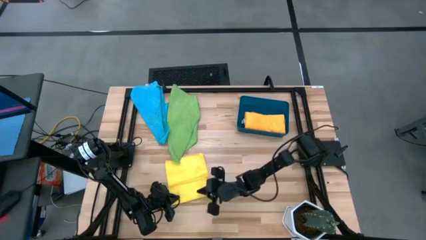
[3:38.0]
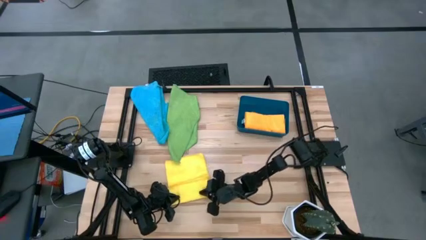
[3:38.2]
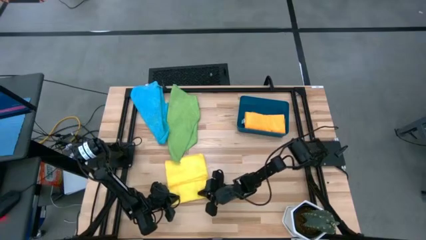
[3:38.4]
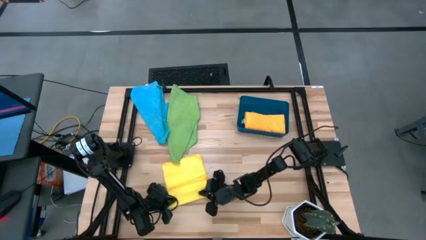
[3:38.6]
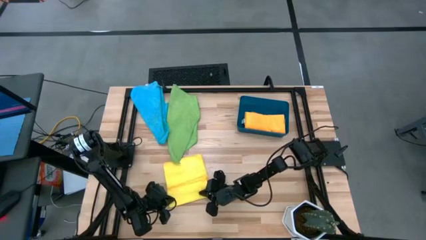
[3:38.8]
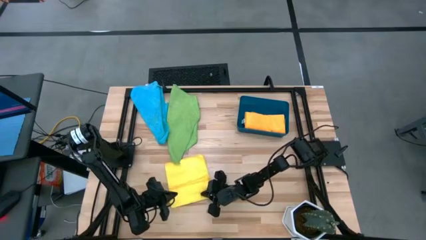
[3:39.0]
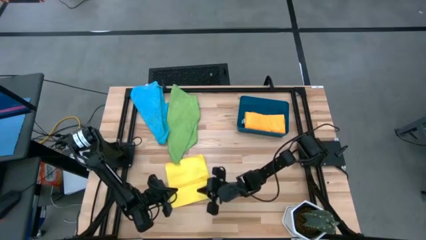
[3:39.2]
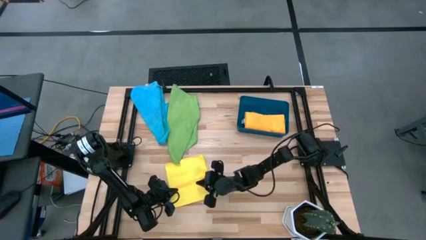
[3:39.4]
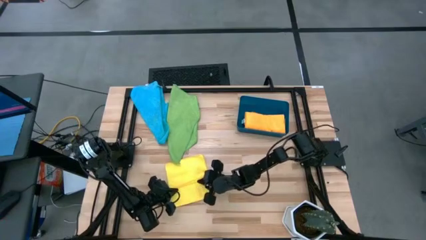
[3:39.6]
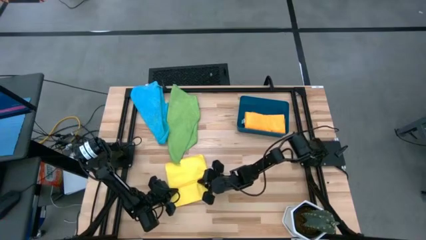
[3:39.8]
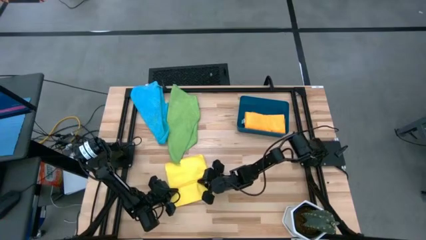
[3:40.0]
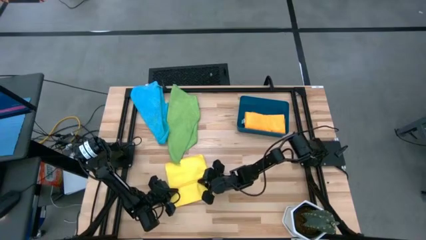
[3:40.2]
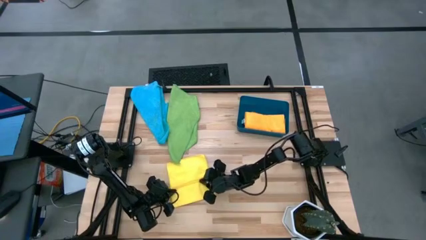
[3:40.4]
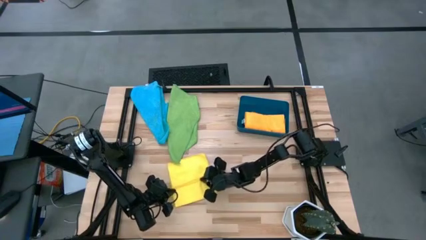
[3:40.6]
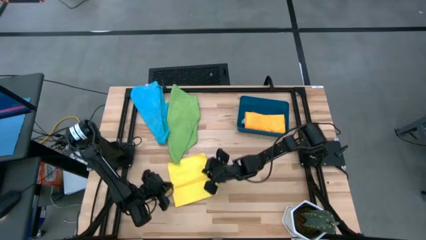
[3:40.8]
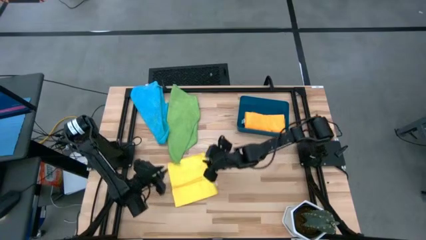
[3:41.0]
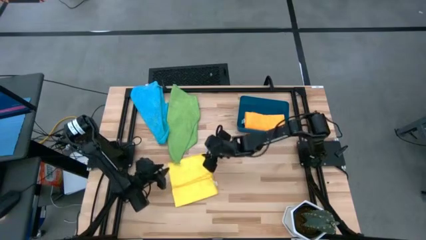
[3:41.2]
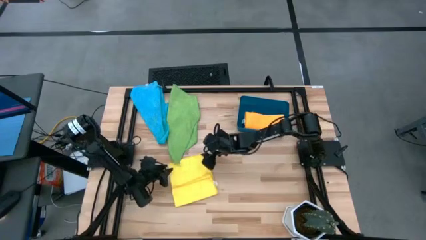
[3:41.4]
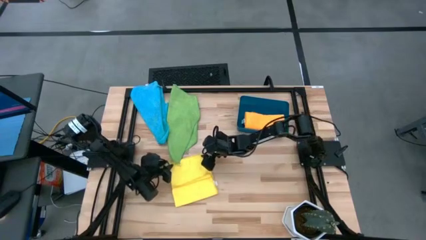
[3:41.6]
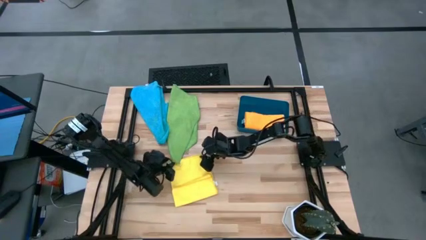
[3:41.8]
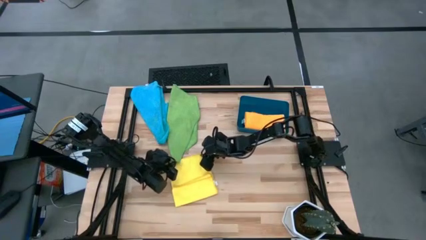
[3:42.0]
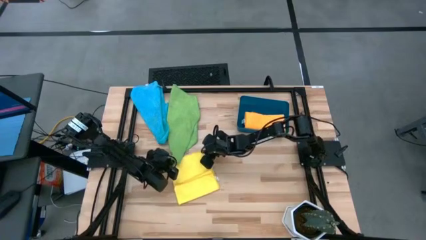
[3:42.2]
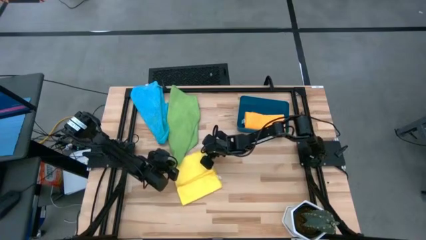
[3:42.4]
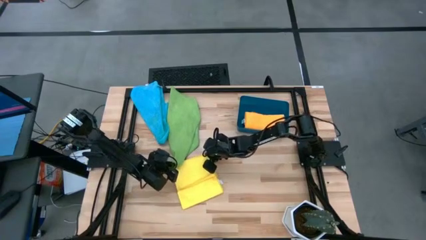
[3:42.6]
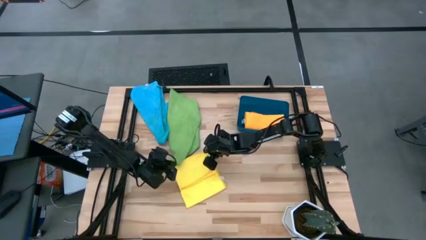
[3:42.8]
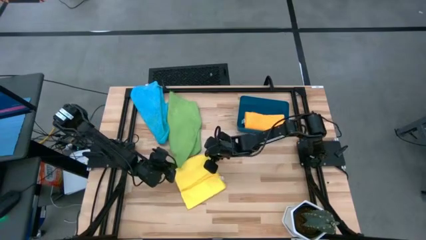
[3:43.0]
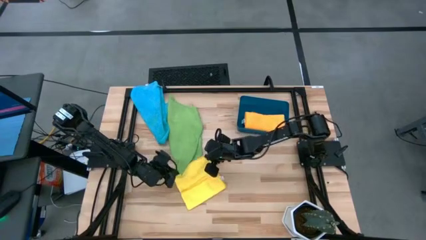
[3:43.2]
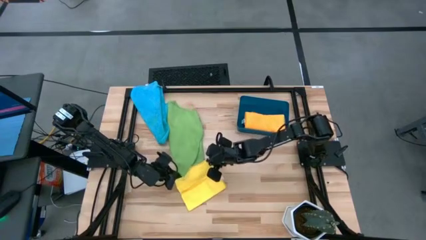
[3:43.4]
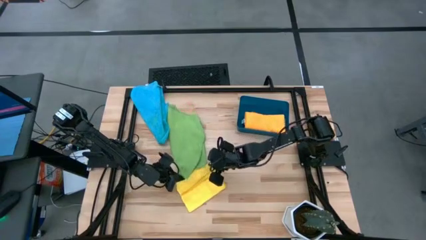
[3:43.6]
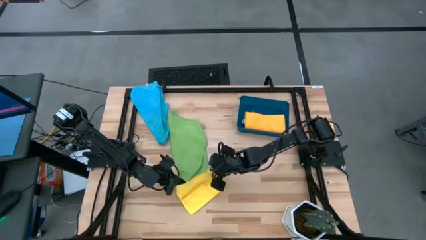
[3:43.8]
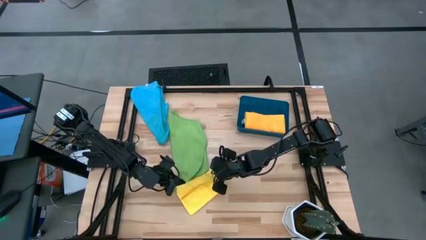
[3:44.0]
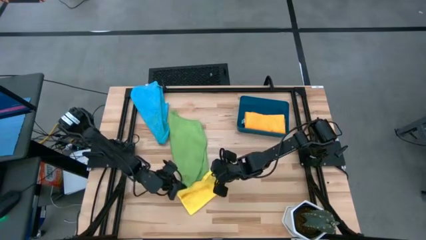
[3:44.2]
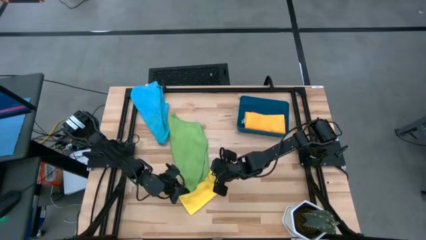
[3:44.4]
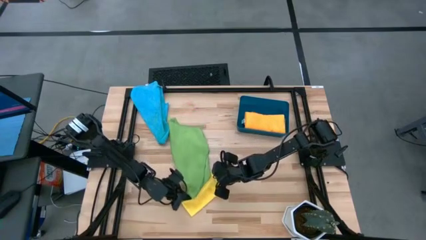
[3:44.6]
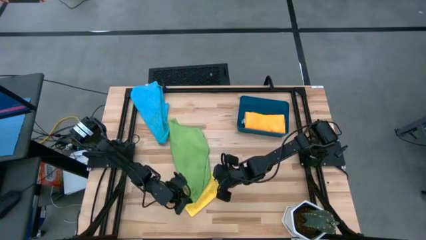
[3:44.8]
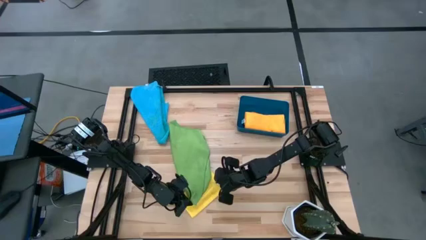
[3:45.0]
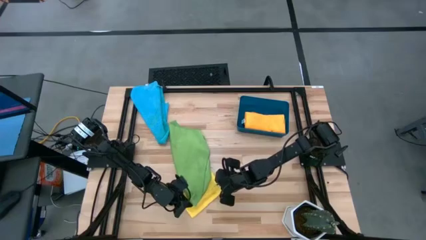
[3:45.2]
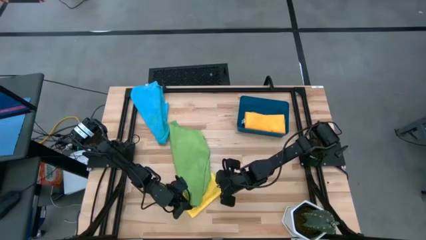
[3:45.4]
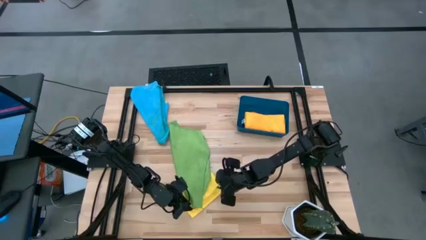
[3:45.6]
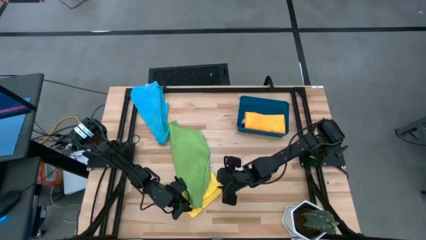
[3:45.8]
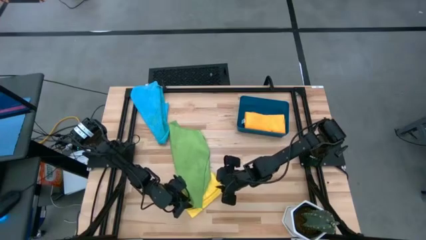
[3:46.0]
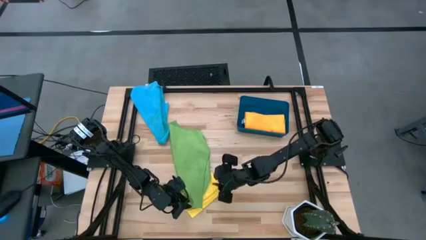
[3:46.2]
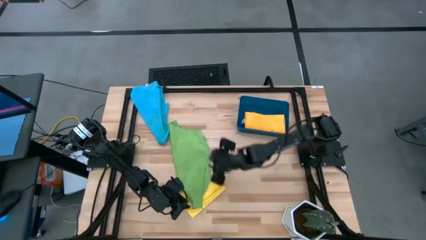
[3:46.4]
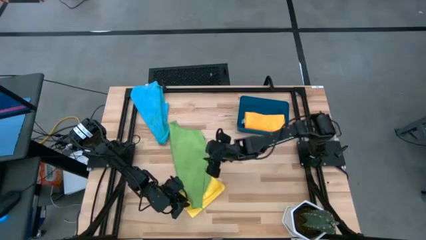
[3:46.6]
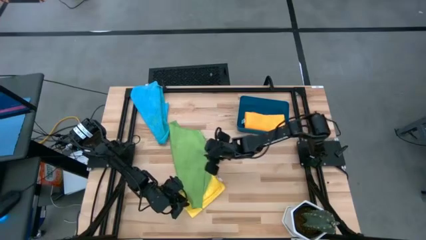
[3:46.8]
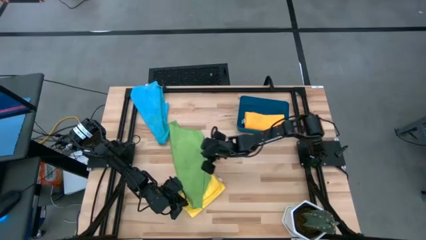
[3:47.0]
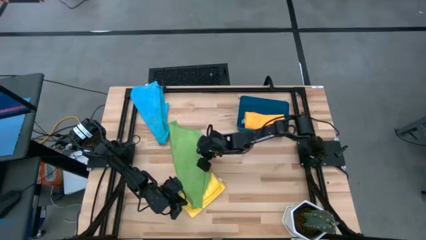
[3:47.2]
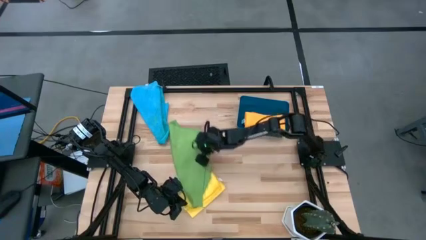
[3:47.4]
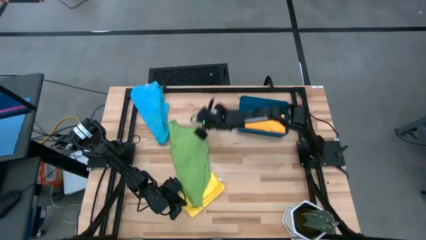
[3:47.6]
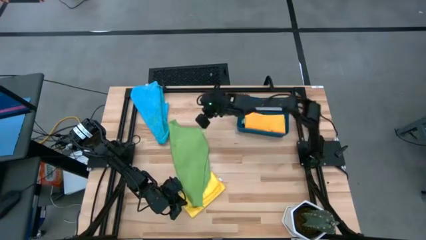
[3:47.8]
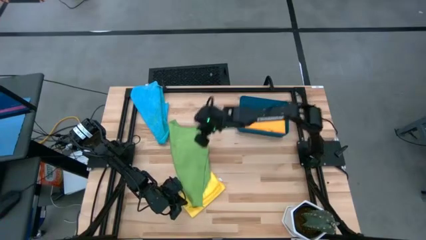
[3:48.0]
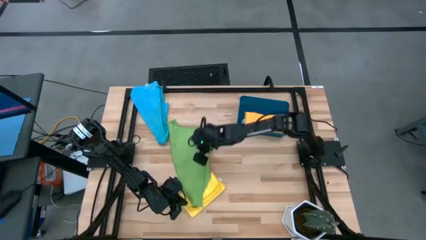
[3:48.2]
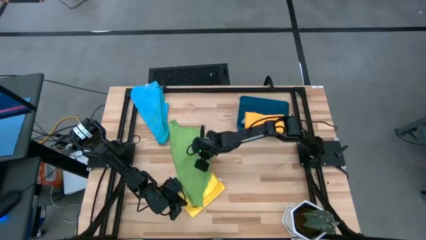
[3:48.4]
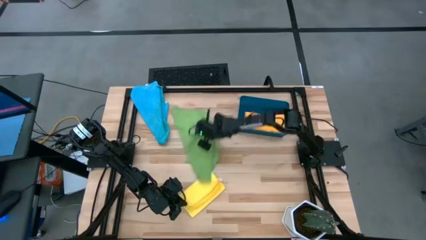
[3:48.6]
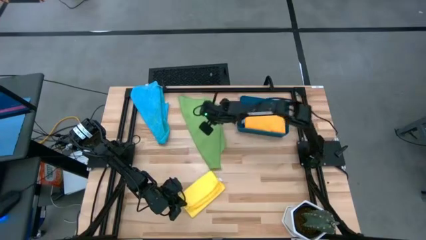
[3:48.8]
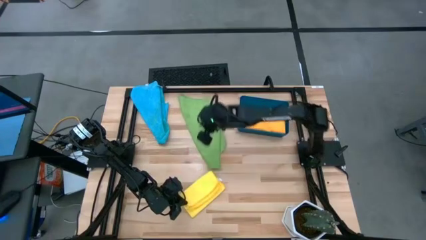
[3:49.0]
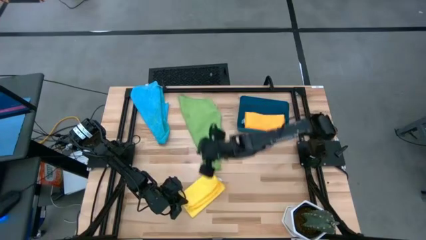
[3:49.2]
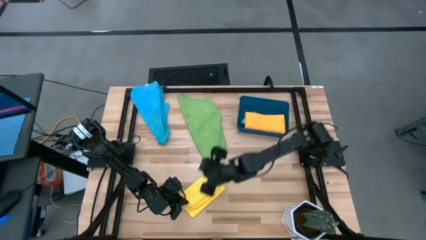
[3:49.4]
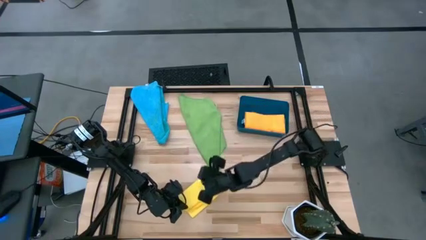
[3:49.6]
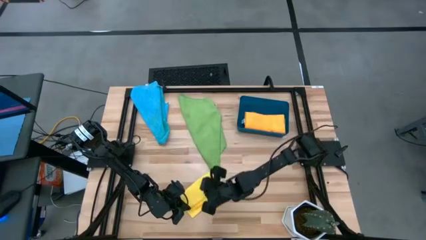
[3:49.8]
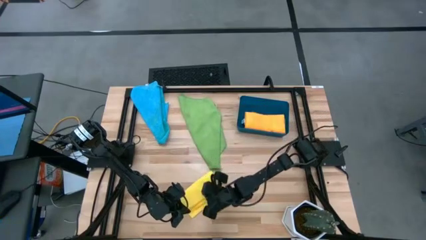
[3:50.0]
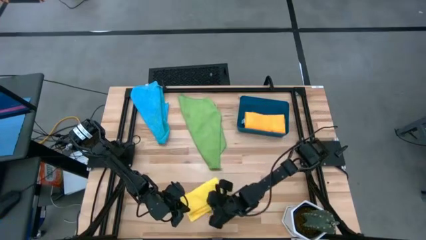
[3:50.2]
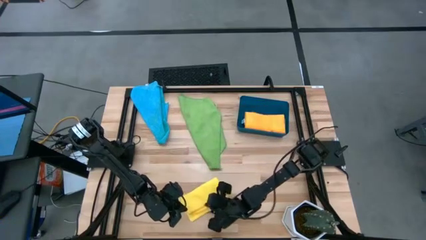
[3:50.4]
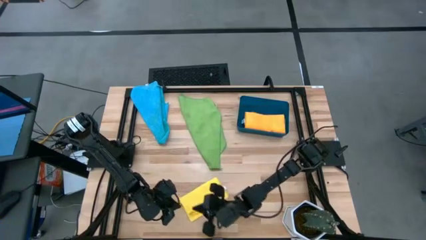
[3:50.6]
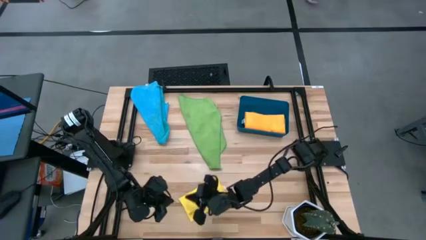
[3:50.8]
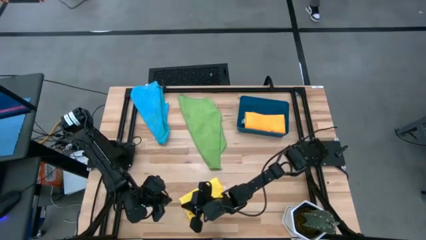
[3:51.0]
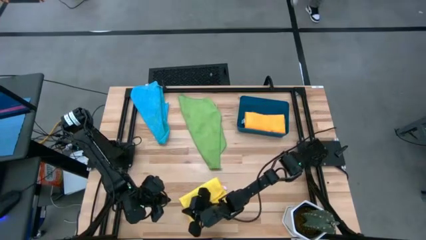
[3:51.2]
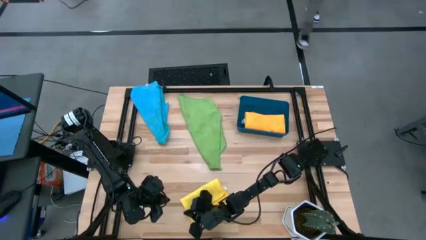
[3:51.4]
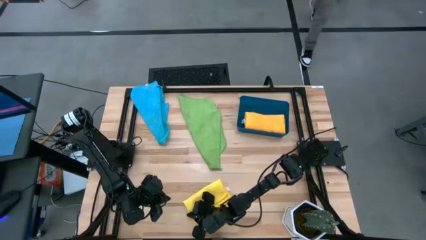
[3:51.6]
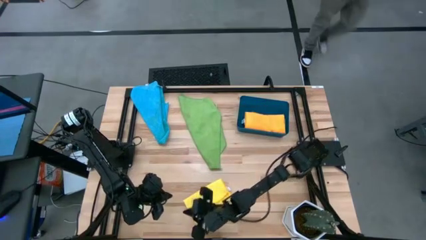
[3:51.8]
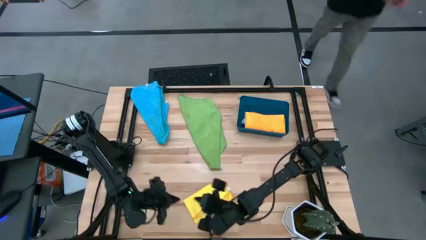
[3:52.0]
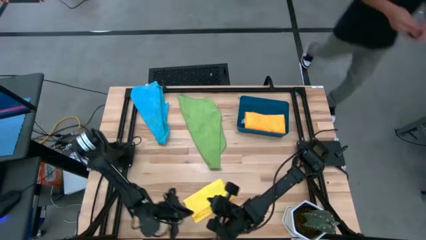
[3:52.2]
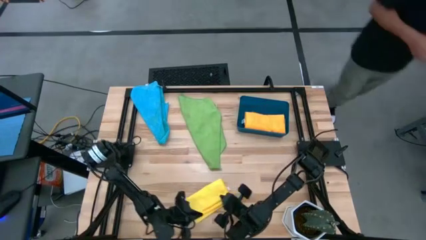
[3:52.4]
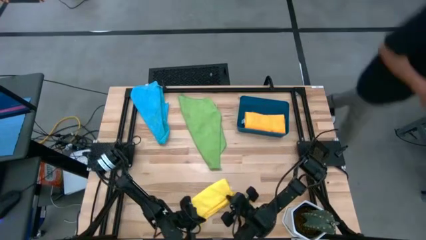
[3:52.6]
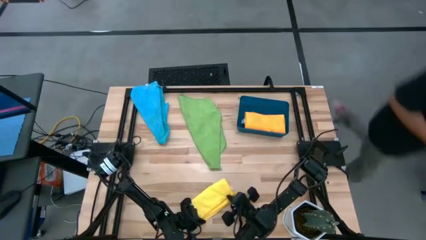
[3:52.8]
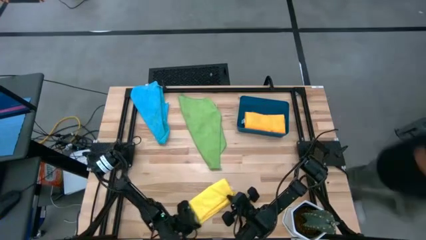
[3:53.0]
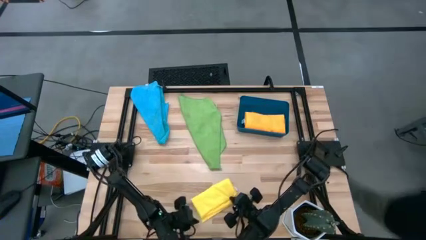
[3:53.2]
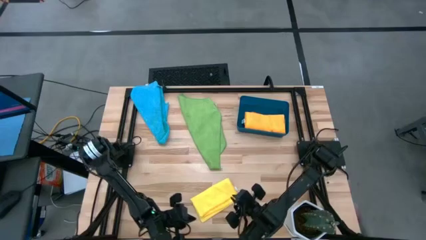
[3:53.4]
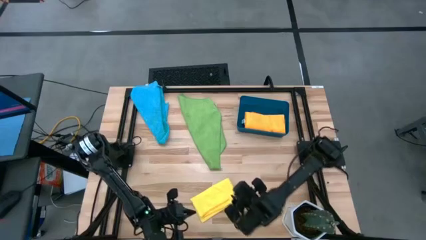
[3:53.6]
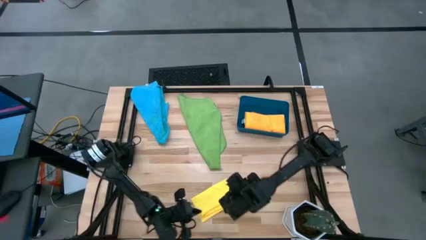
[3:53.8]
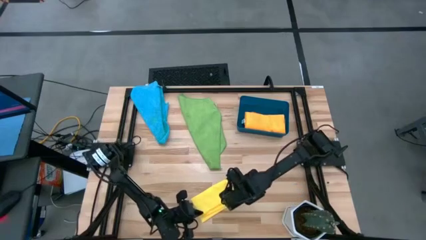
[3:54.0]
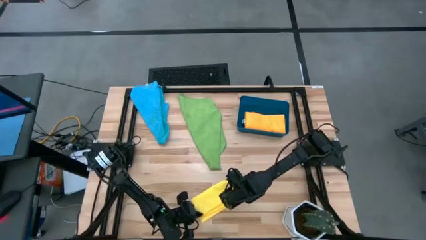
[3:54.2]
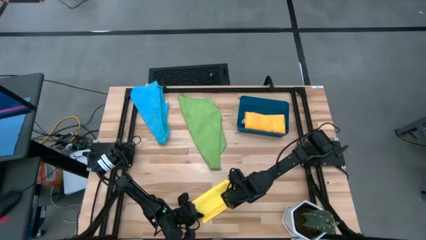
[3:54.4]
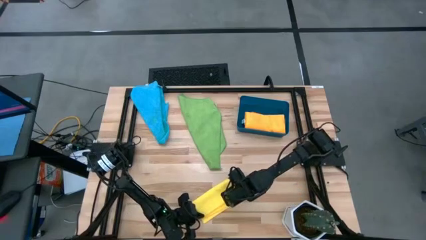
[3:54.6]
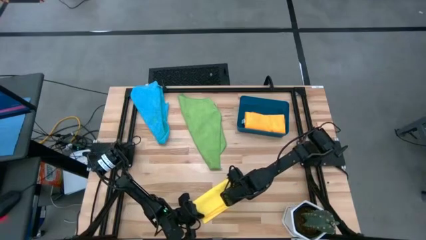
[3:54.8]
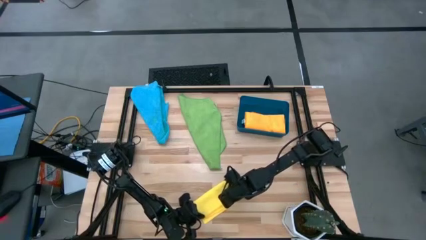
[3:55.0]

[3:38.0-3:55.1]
Task: Fold microfiber towels
Fold the yellow microfiber cloth
